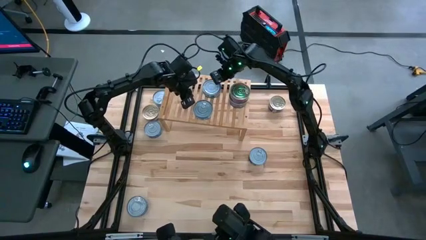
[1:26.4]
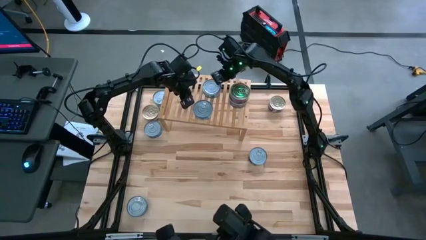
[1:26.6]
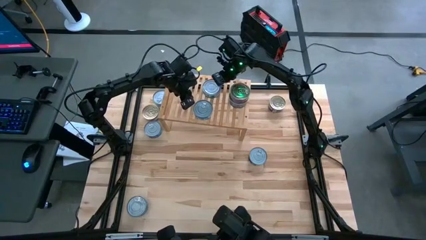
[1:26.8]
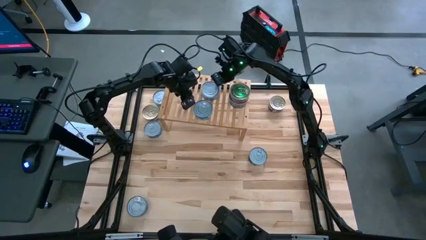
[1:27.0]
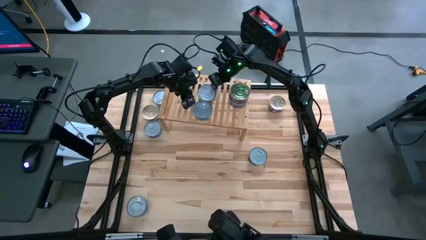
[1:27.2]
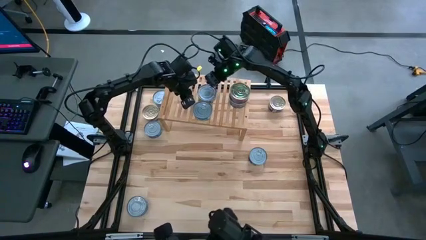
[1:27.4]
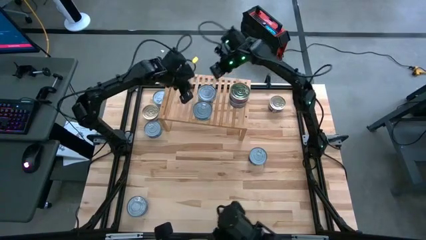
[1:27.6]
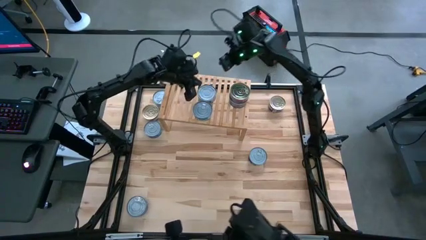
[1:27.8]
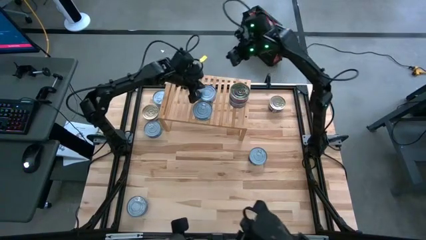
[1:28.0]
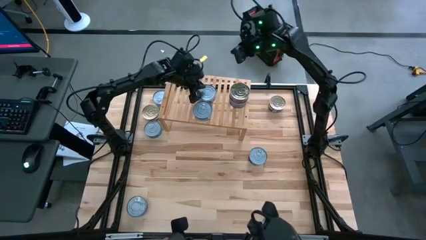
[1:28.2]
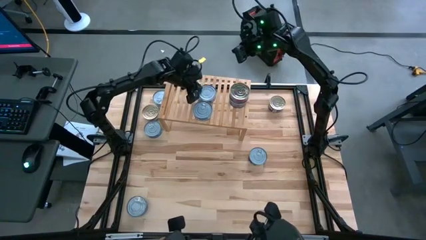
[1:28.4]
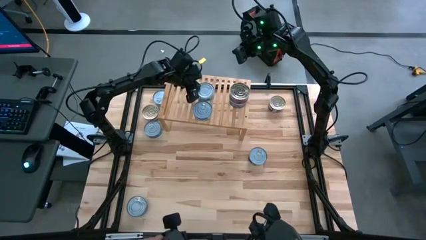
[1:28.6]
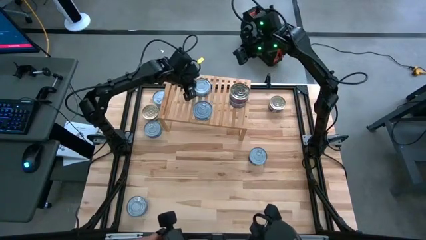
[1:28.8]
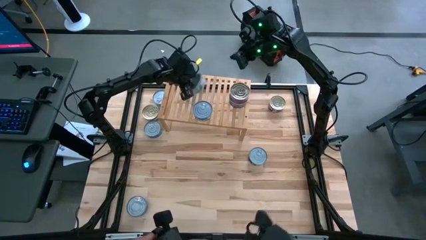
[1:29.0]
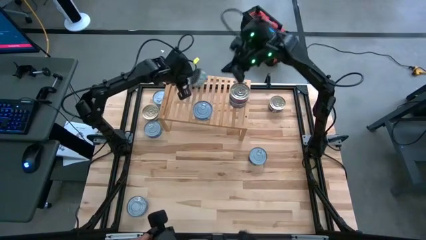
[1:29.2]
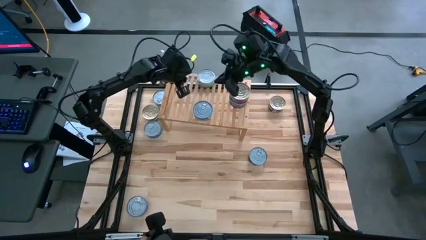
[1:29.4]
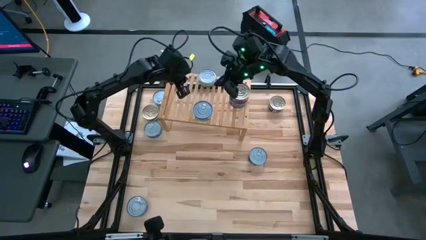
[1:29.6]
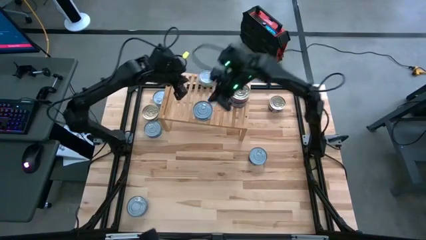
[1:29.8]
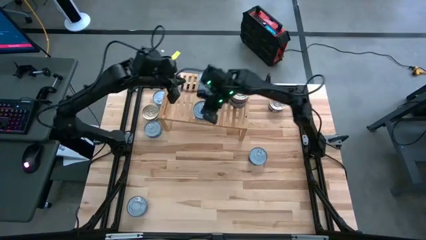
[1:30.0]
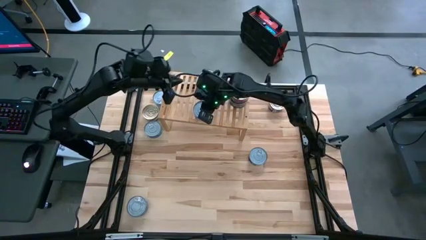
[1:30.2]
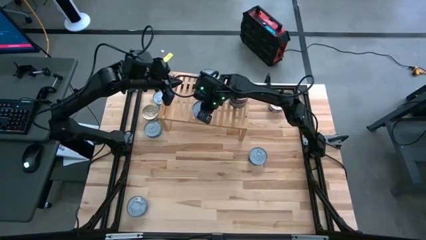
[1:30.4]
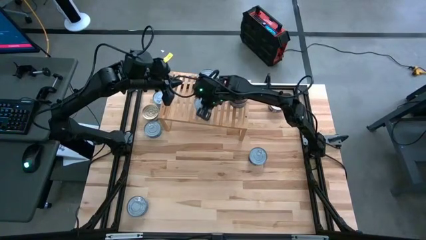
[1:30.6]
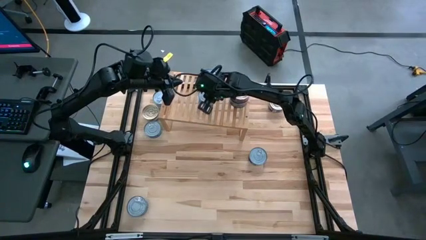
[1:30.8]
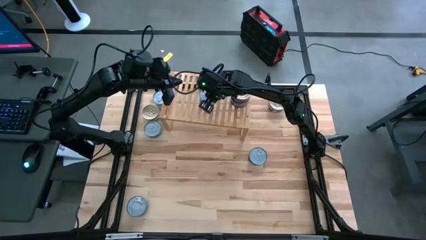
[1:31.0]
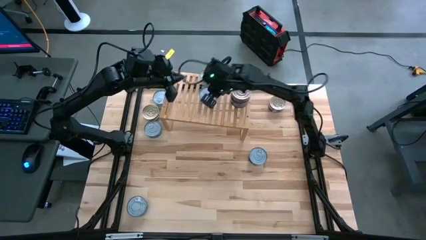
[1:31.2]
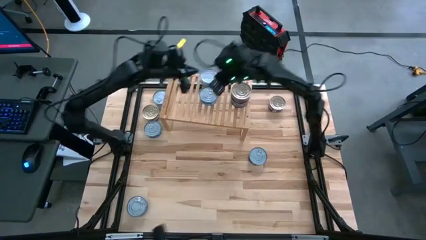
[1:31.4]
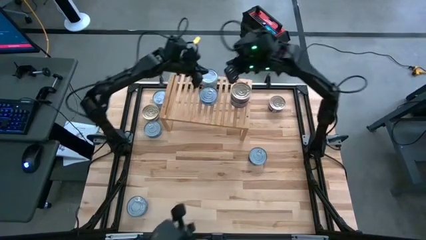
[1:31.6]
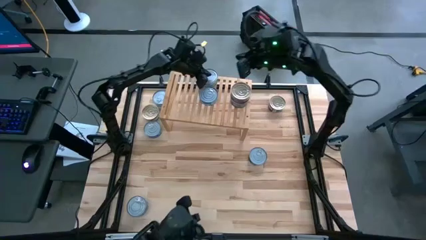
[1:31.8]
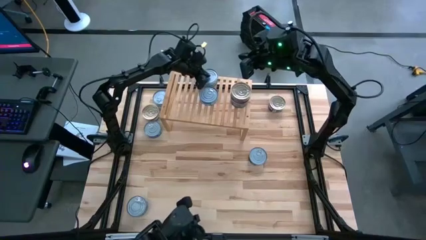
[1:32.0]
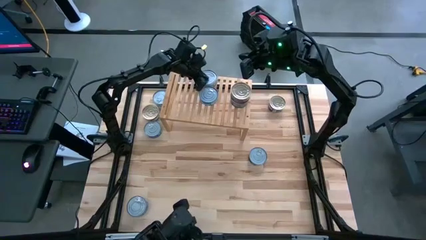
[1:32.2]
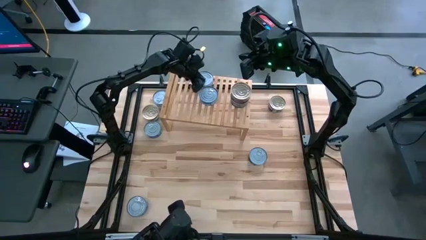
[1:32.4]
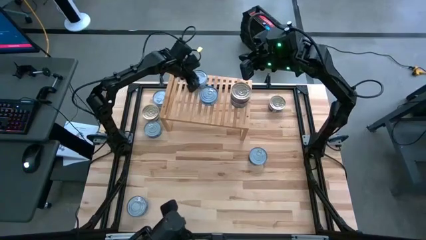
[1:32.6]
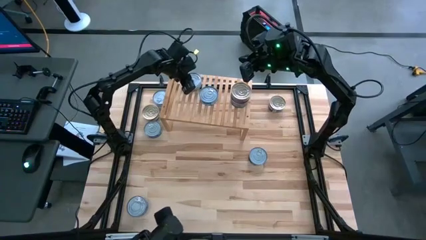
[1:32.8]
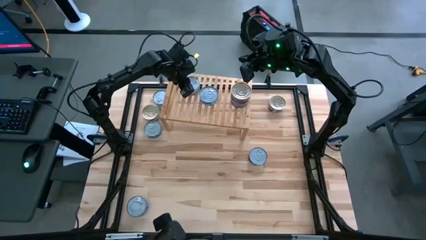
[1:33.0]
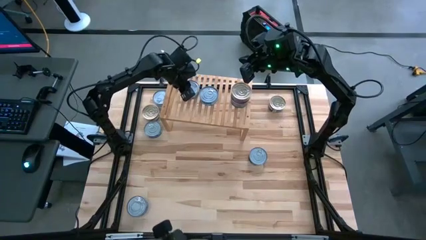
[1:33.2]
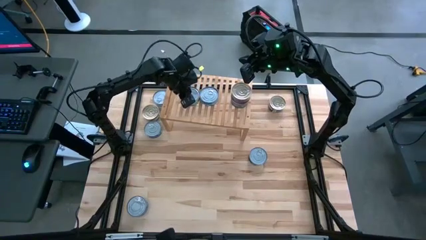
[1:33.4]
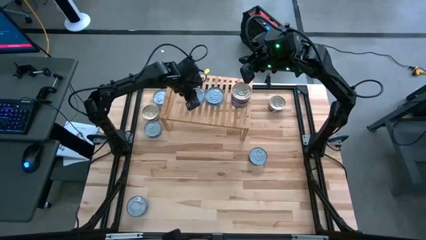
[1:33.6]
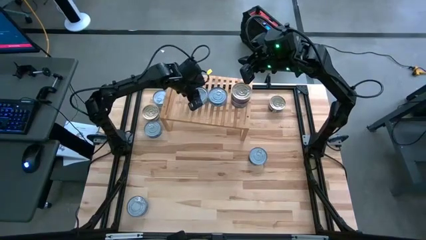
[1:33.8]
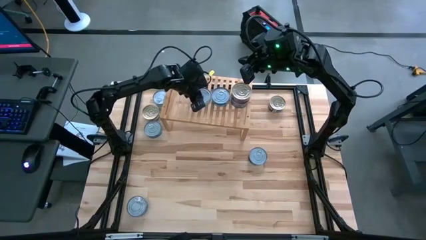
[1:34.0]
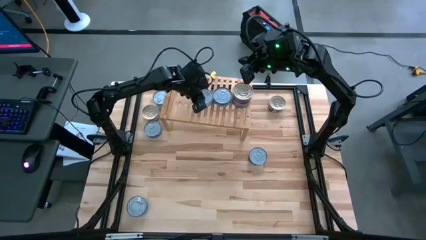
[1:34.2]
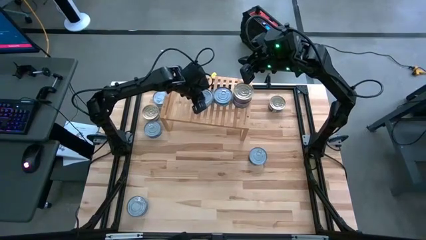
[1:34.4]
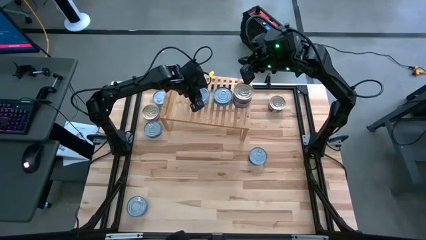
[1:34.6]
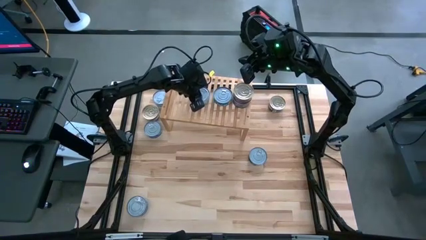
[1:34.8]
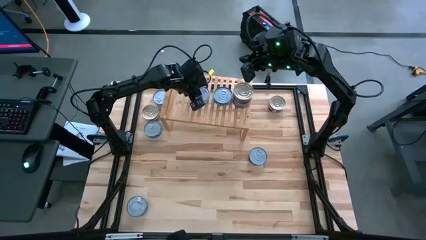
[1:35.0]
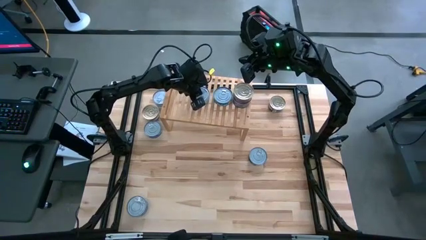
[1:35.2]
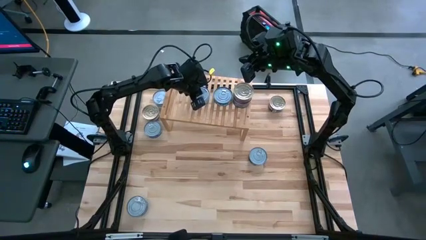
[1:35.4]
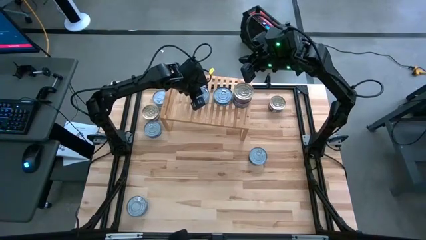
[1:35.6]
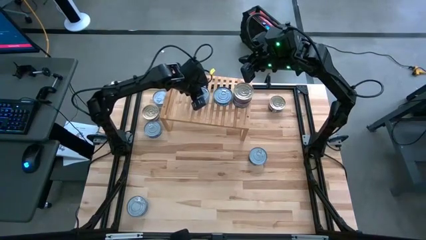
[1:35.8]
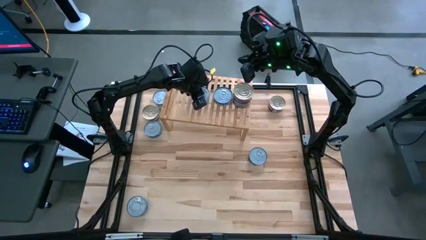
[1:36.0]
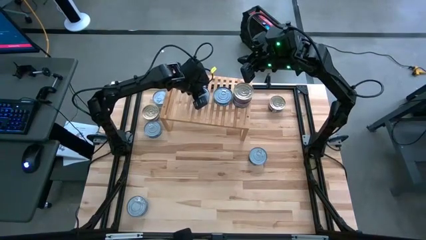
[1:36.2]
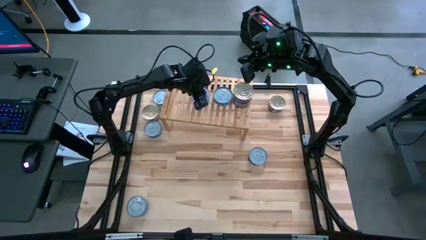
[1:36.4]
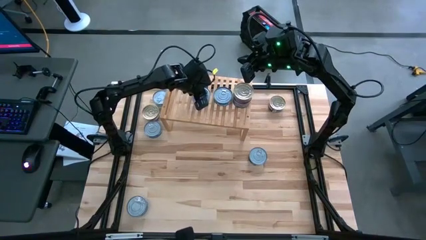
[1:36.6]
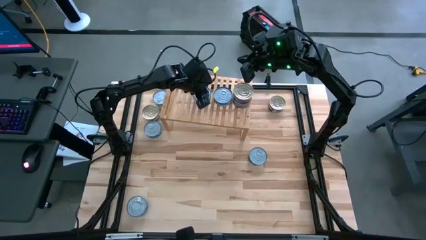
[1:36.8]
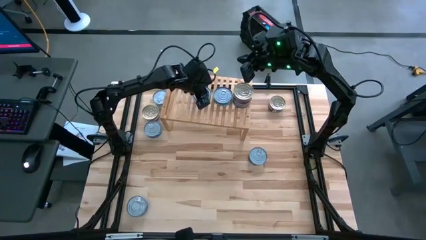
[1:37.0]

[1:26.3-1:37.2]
Task: Stack canned seafood by type on shelf
Adjust the tuna cans on the shelf

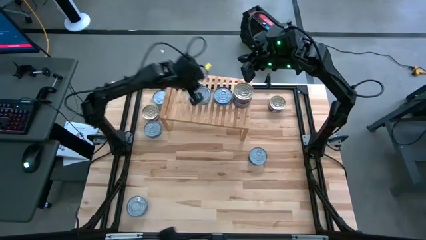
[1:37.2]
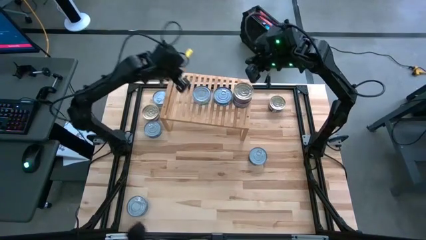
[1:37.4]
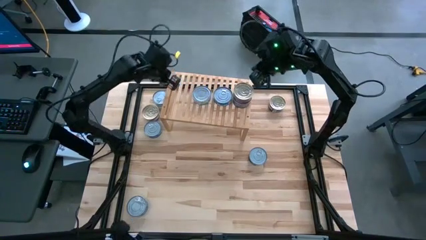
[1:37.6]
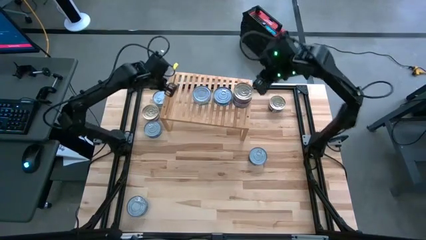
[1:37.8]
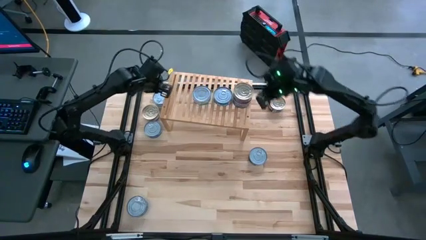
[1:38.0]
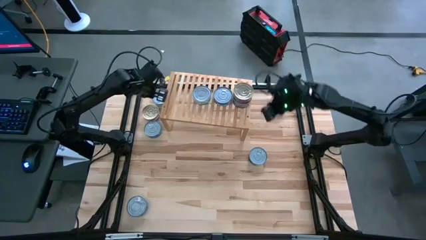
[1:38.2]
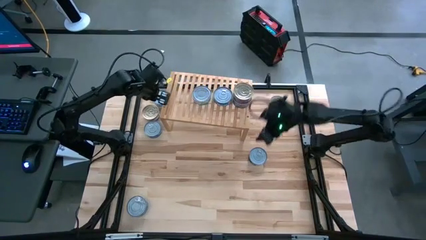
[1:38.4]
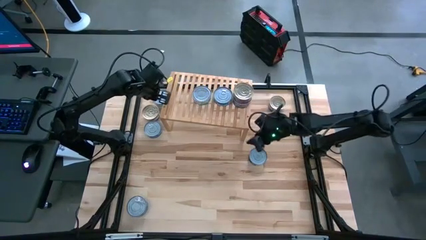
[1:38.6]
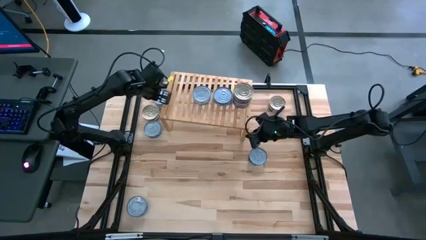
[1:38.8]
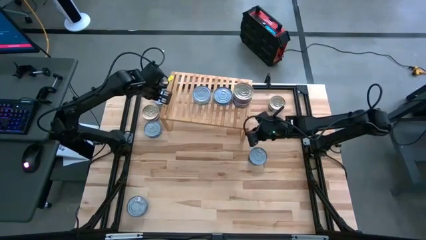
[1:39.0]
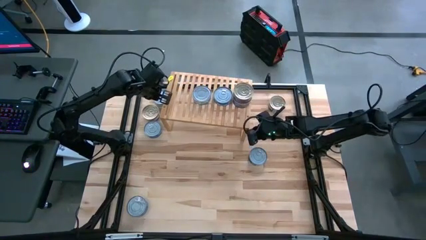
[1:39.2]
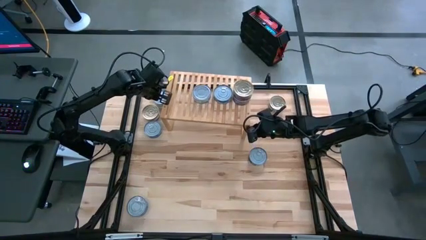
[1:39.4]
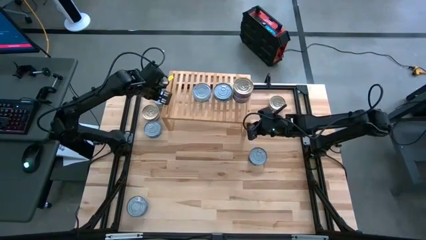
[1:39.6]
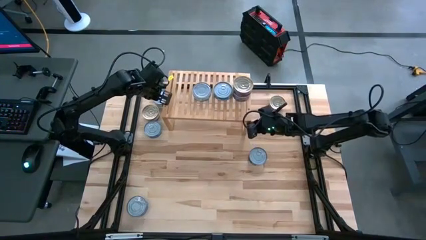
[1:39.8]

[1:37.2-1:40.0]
Adjust the shelf

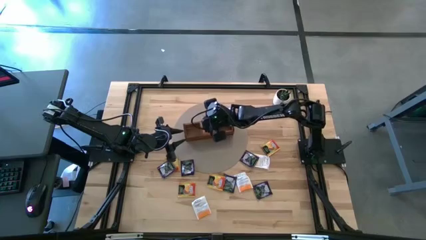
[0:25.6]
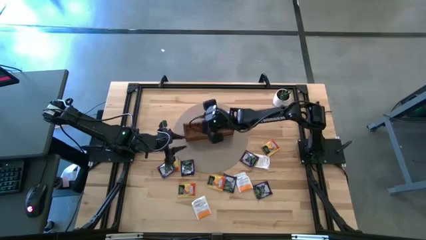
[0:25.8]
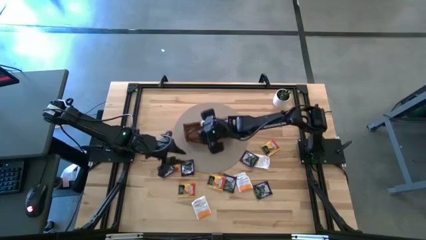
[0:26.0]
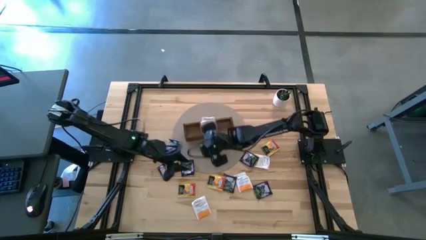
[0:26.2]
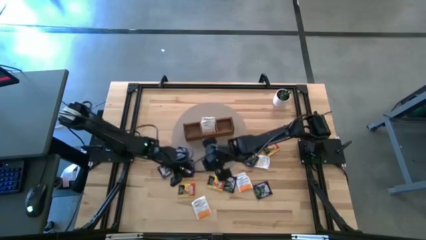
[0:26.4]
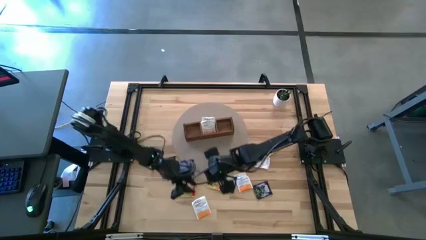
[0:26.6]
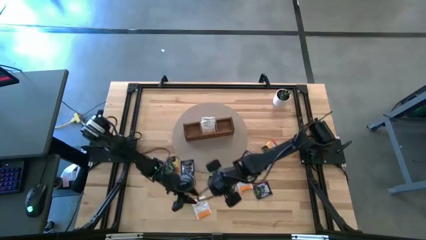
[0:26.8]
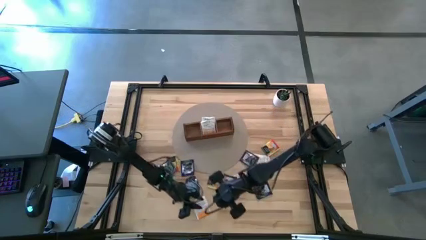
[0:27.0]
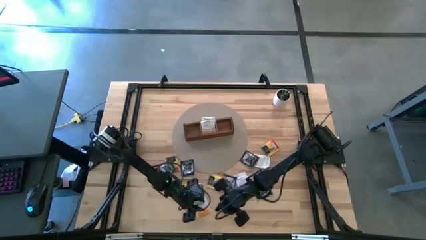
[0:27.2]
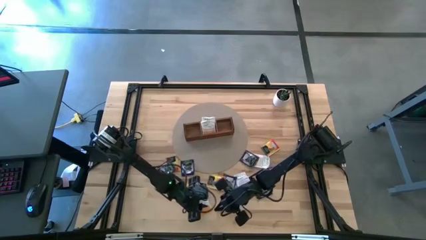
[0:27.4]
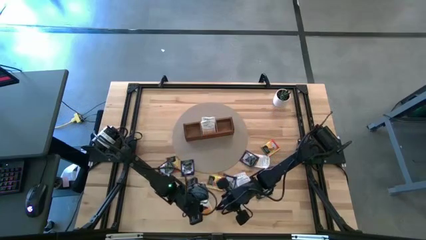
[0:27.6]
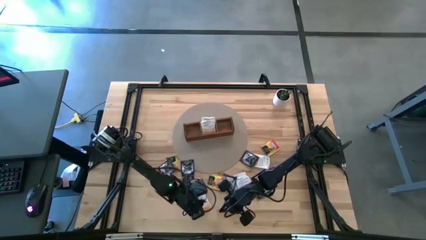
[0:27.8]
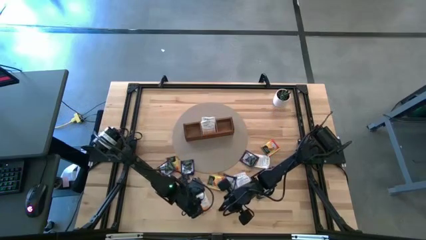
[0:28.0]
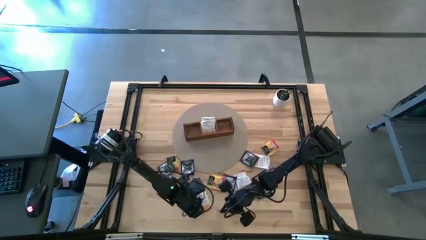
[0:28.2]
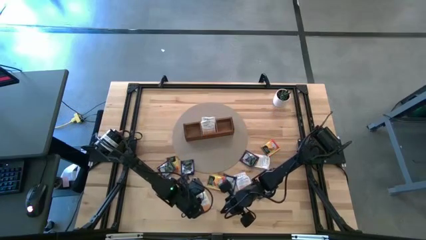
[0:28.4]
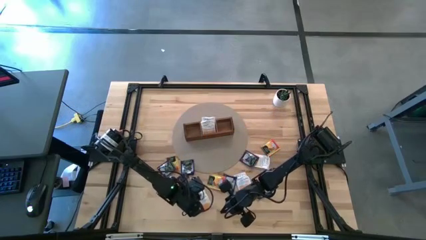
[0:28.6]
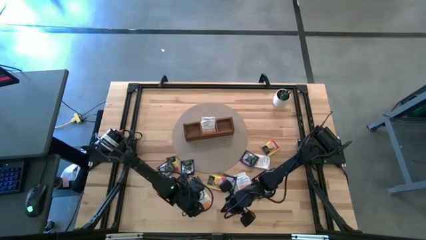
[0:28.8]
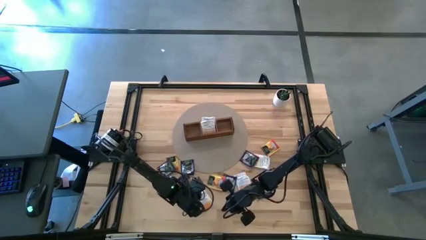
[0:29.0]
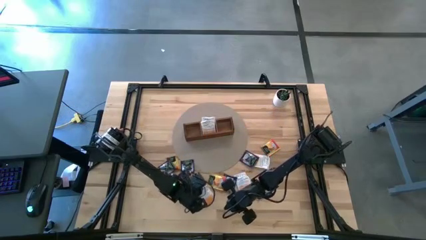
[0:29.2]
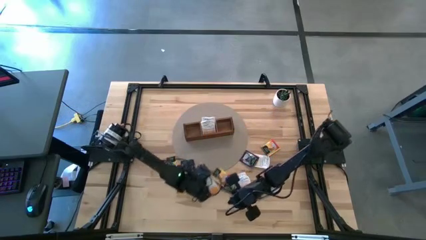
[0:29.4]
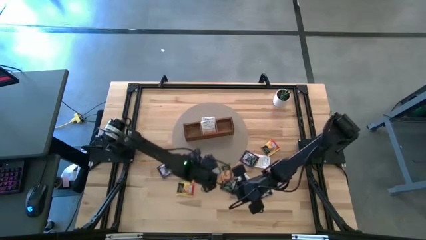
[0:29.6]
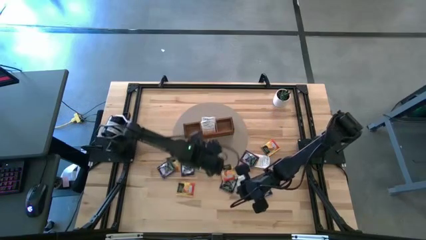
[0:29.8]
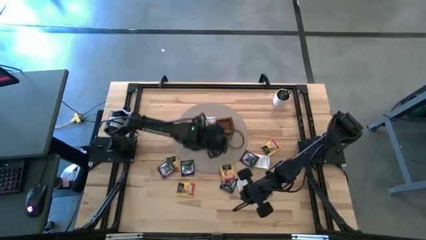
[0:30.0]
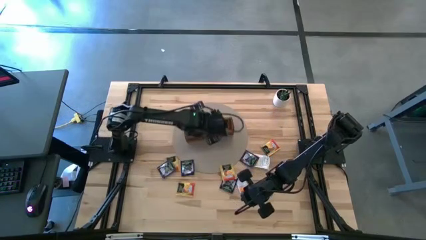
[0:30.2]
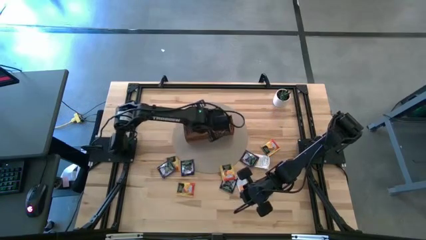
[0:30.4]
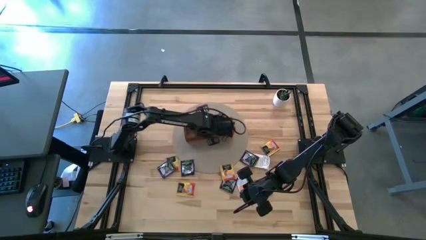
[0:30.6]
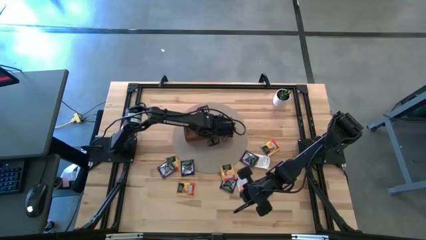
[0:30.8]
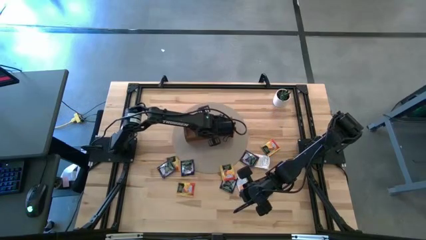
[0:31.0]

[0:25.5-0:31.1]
Task: Pick & Place Tea
Put the white tea bag into the middle section of the wooden organizer
